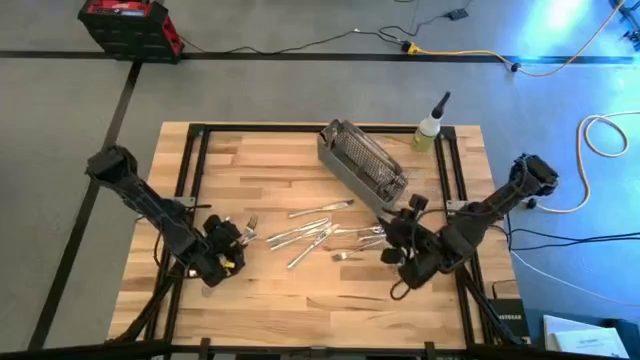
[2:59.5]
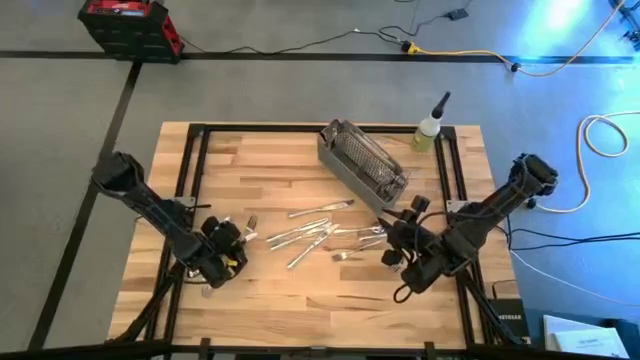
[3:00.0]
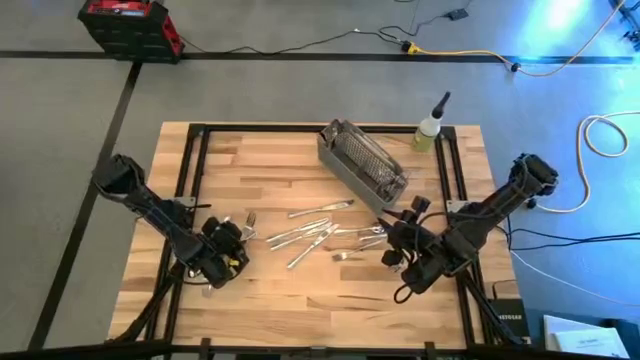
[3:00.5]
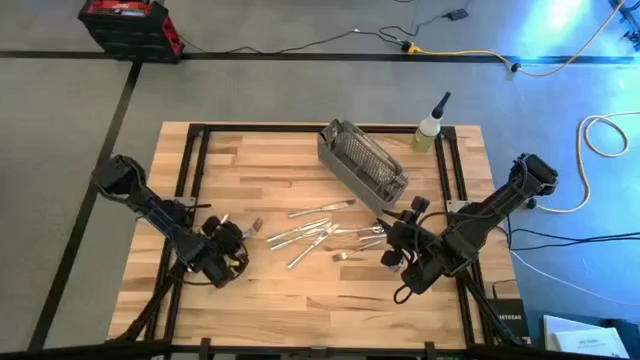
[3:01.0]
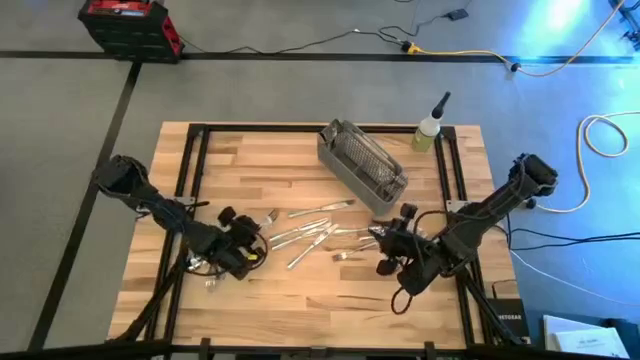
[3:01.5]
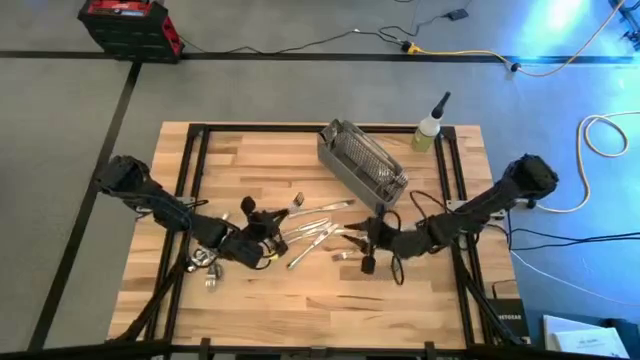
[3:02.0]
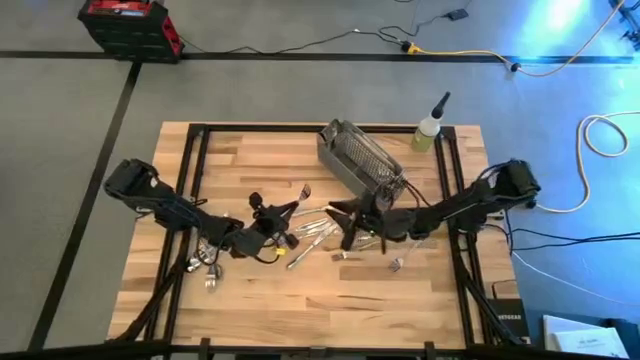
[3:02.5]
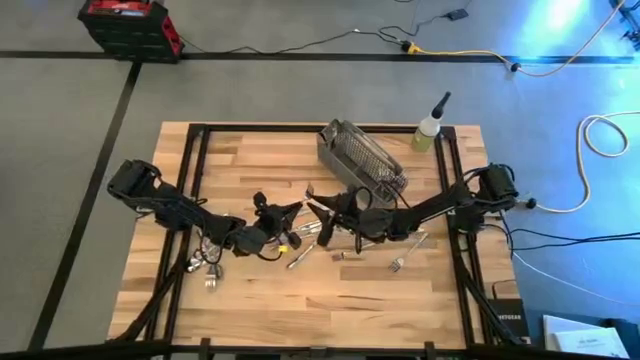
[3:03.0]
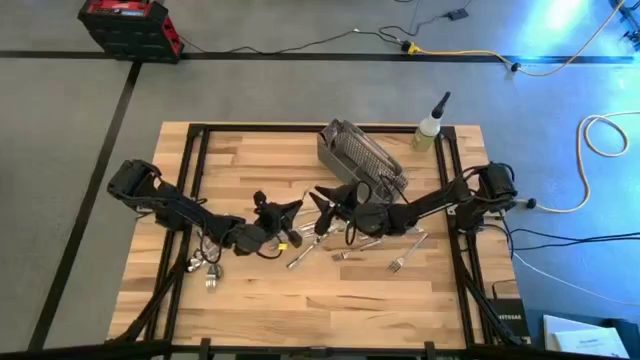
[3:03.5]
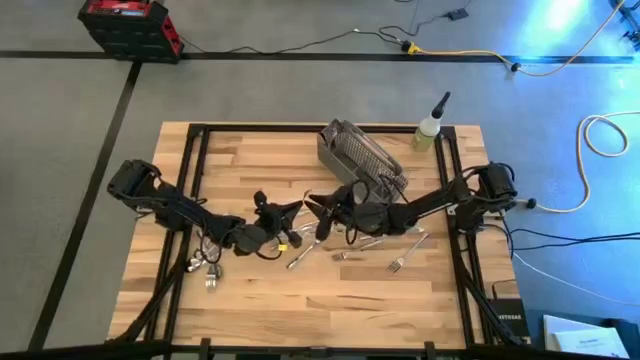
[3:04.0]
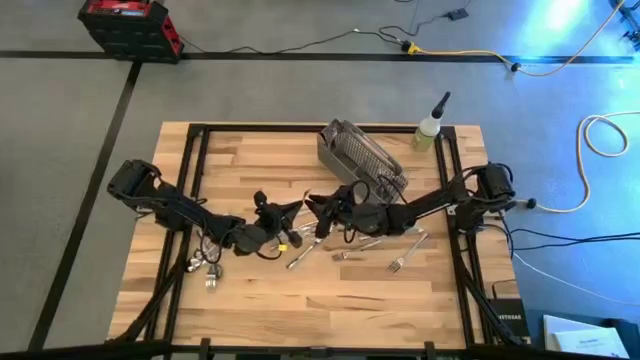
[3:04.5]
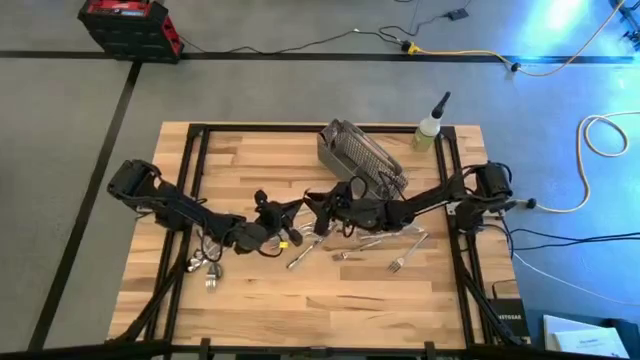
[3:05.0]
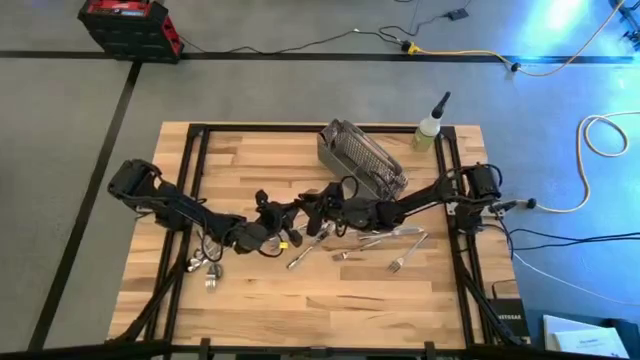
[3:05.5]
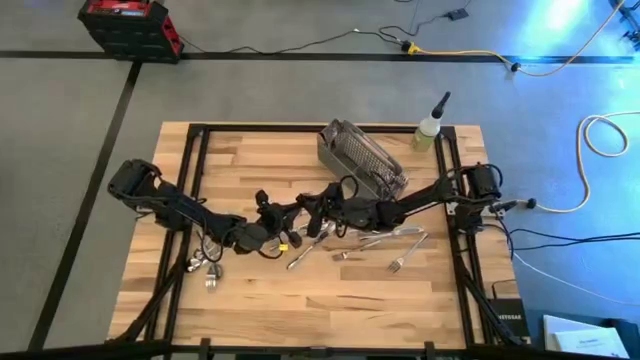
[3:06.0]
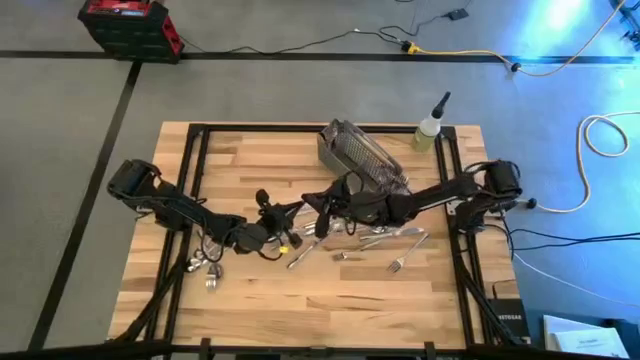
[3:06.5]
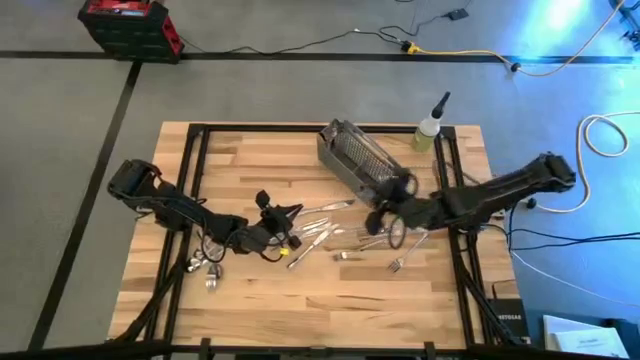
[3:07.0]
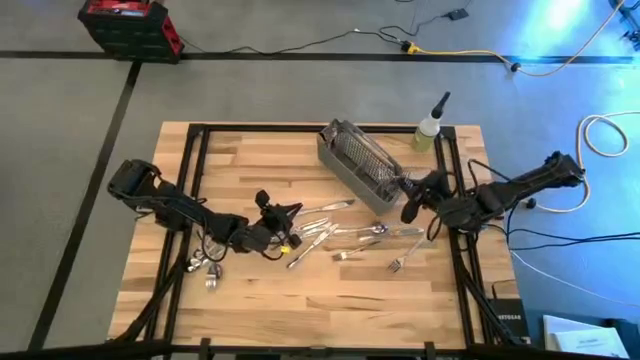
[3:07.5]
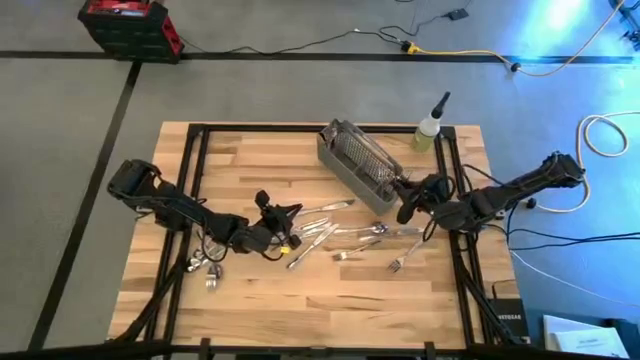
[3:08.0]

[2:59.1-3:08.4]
Task: Sort silverware
Put the silver fork into the gray silverware organizer

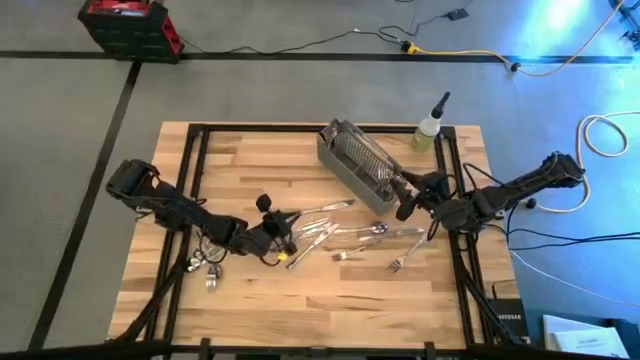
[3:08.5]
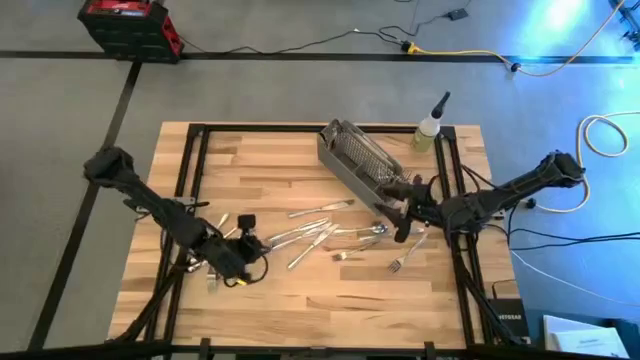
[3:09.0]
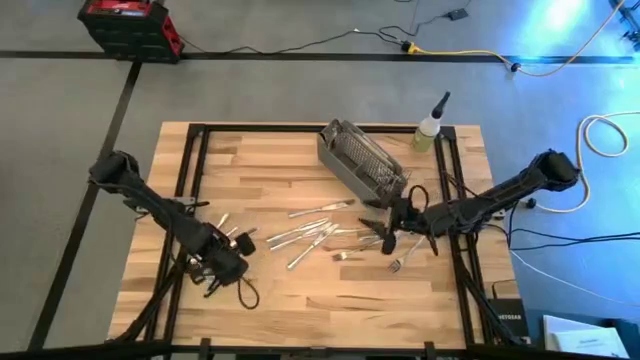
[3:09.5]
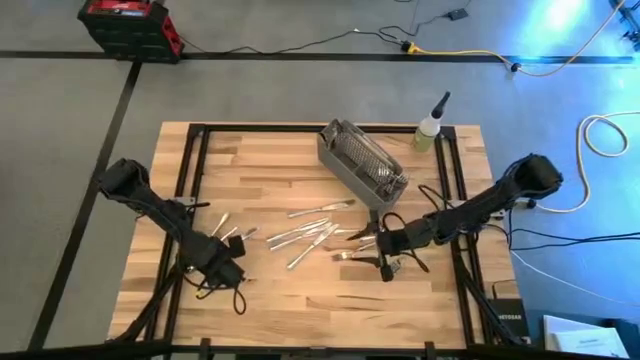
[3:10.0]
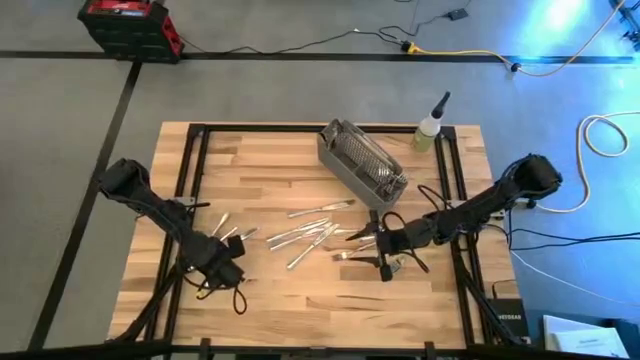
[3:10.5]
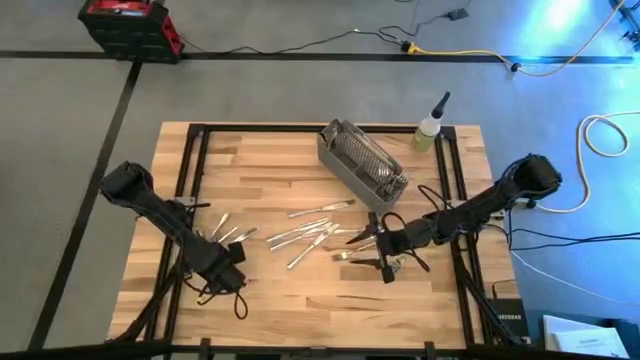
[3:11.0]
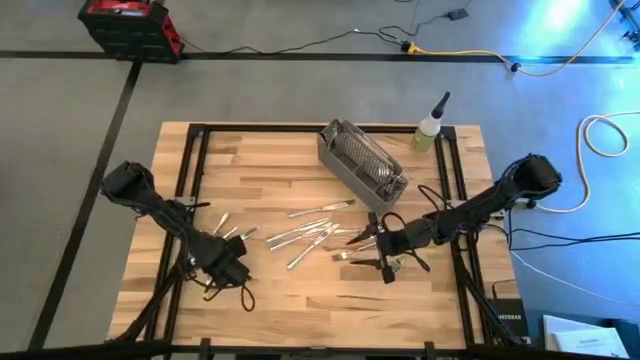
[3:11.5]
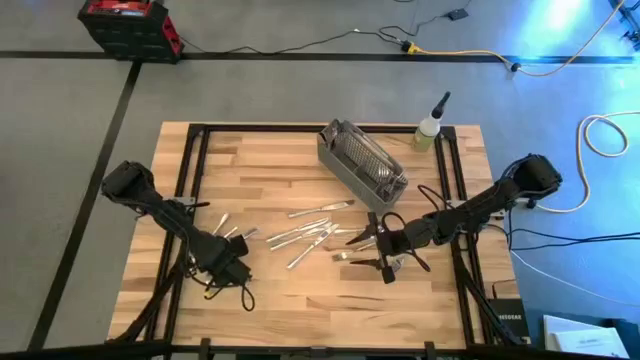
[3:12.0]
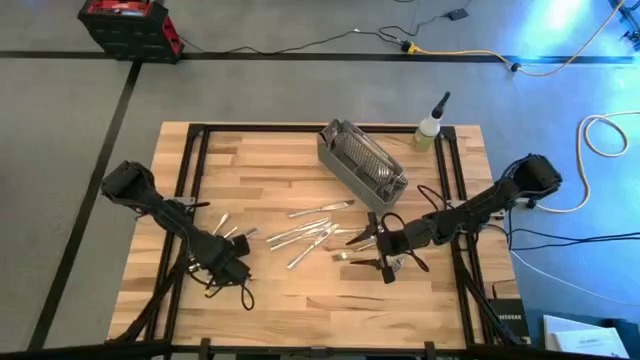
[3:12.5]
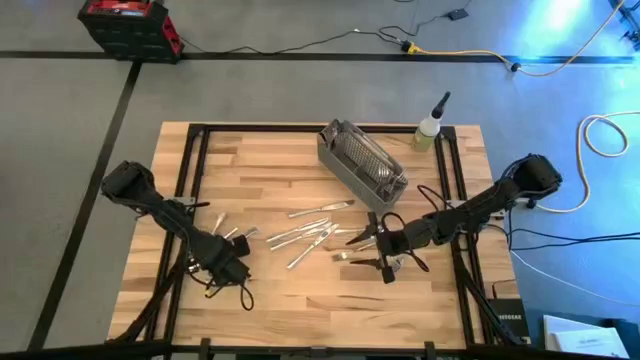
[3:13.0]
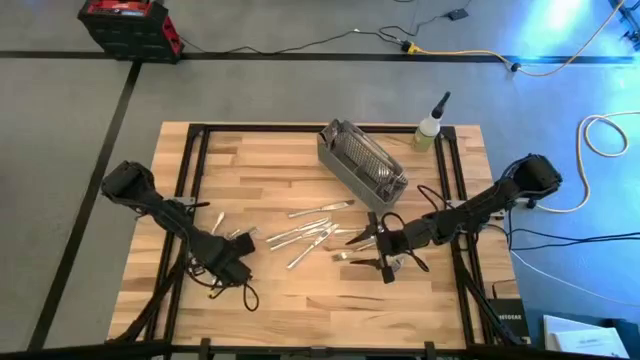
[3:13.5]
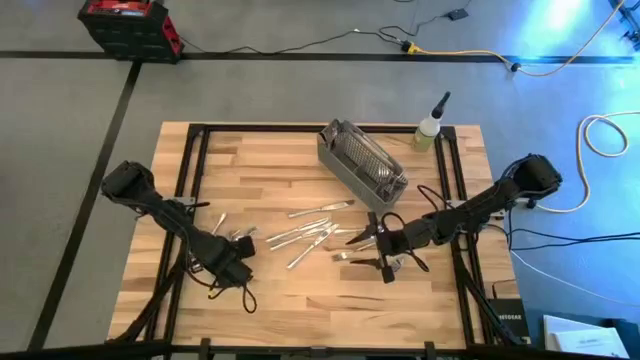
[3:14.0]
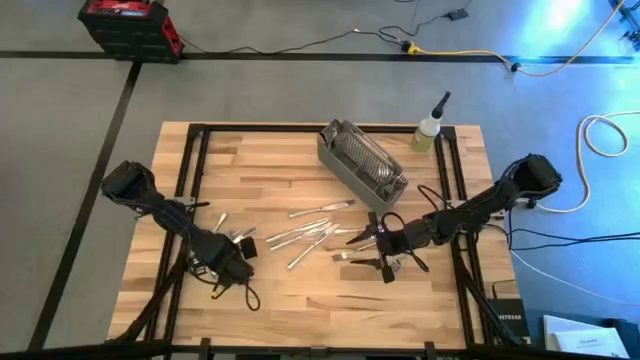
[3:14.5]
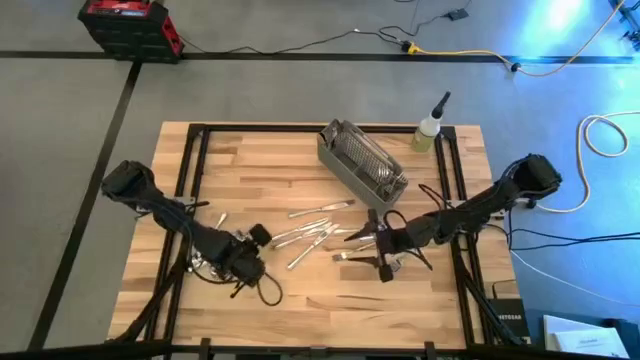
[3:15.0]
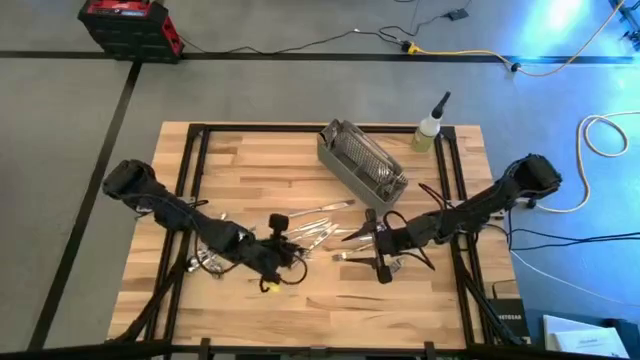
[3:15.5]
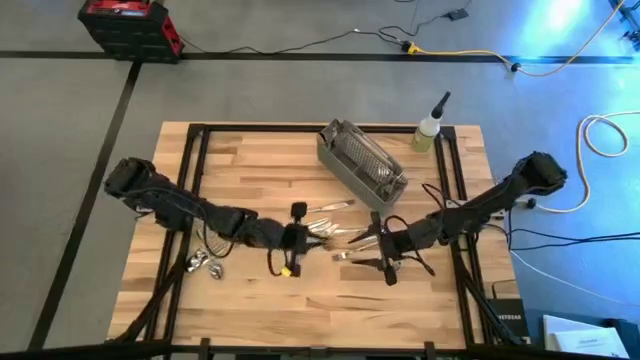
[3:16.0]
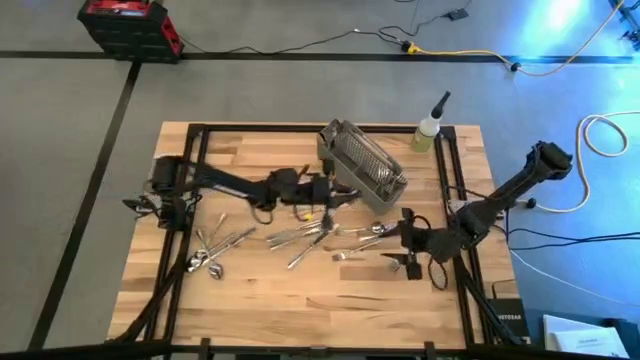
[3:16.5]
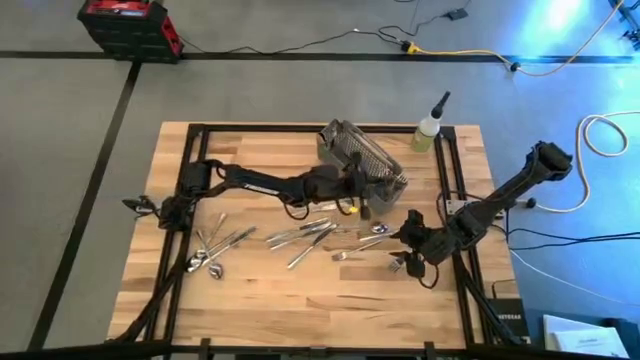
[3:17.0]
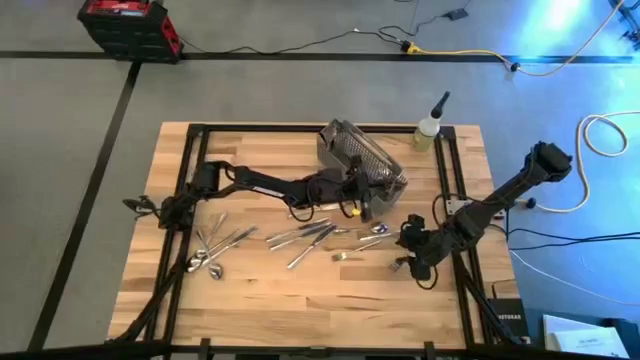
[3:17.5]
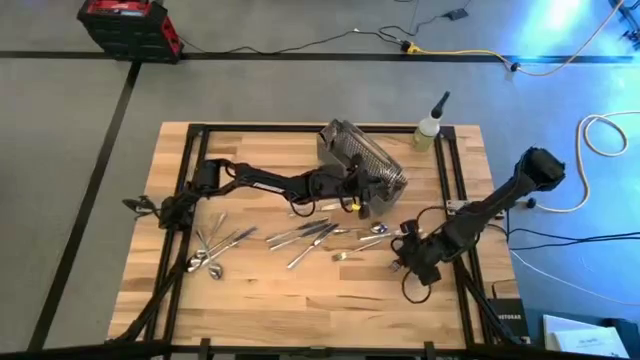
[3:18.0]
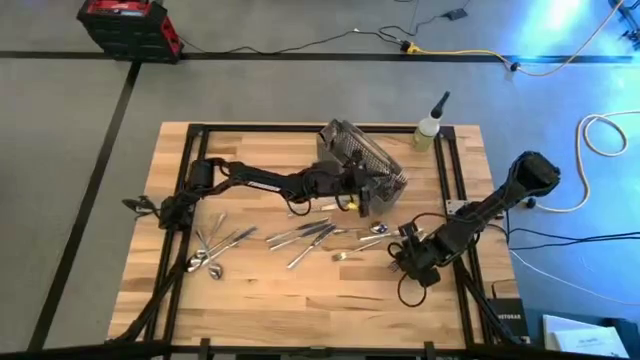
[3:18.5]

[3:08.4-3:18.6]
Put the silver spoon into the gray silverware organizer

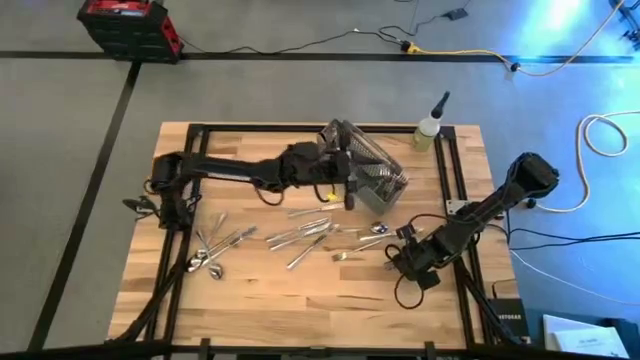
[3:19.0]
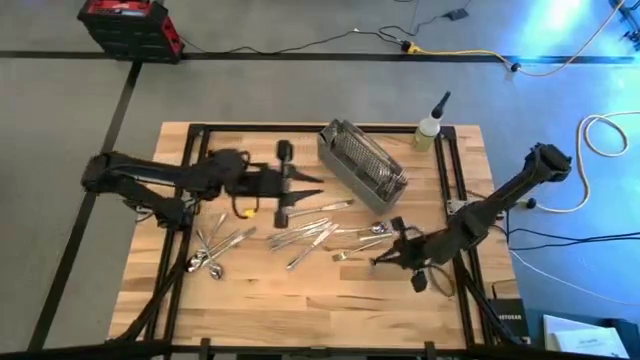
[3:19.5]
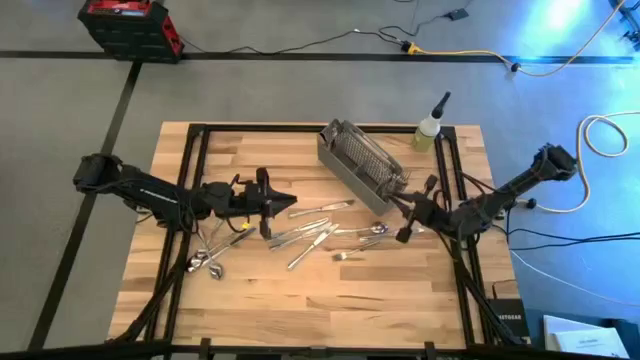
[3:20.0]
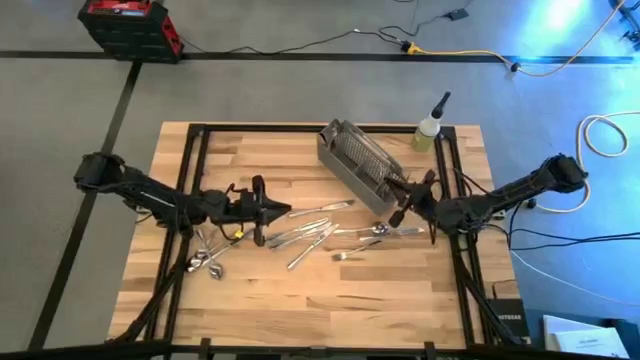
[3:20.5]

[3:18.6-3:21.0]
Put the silver fork into the gray silverware organizer
